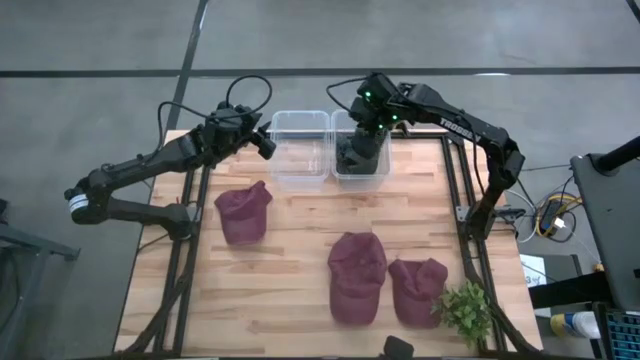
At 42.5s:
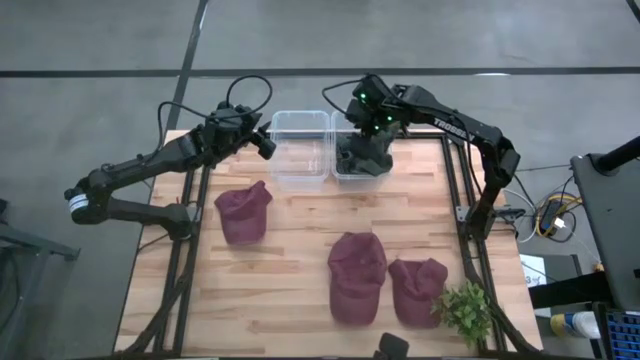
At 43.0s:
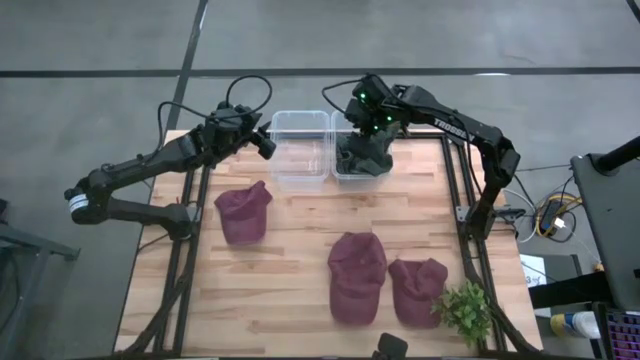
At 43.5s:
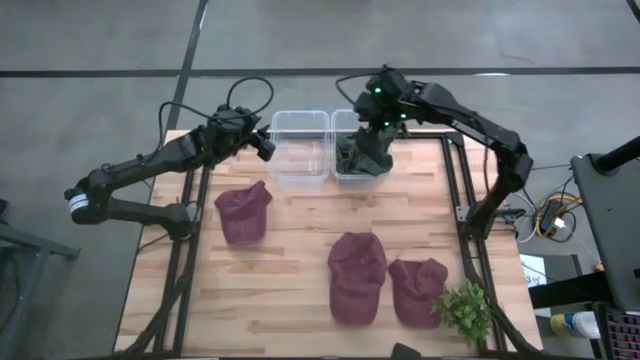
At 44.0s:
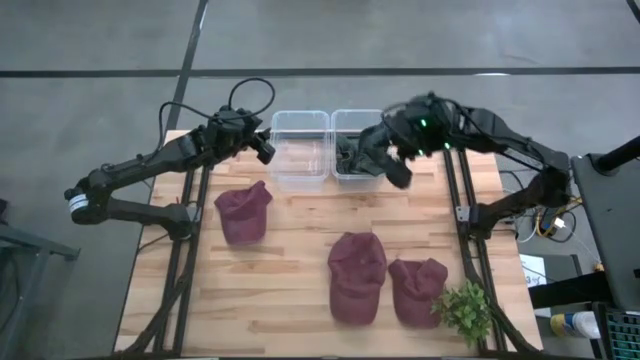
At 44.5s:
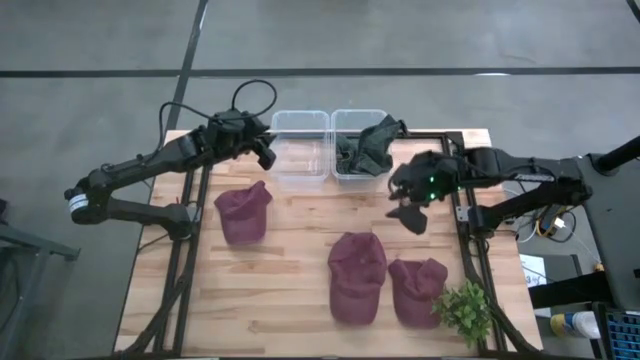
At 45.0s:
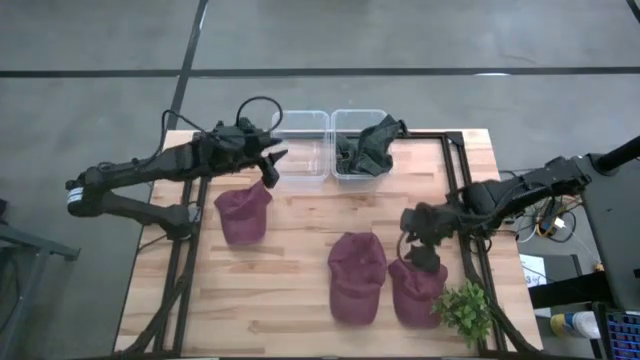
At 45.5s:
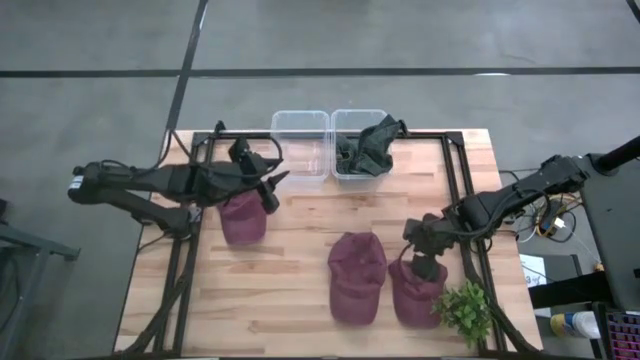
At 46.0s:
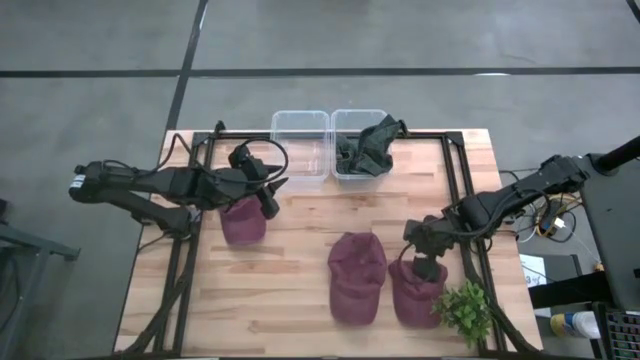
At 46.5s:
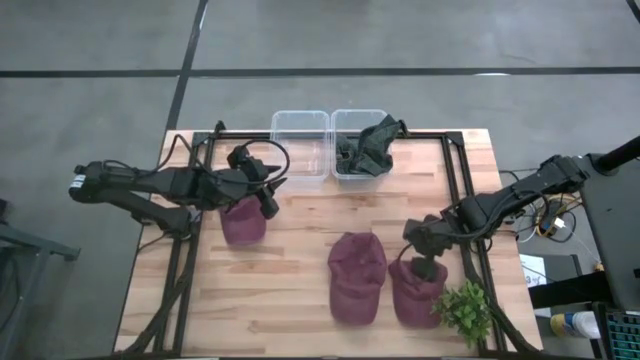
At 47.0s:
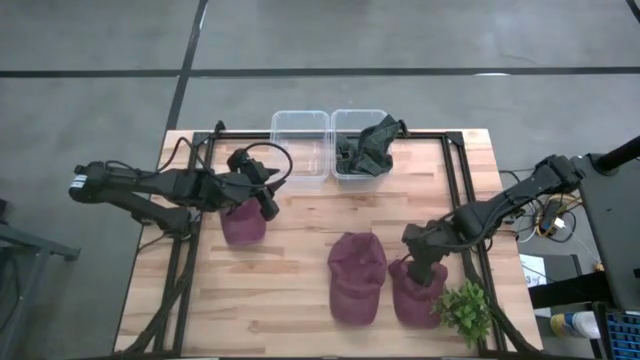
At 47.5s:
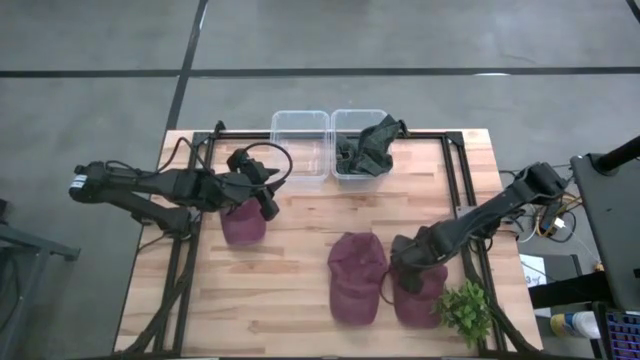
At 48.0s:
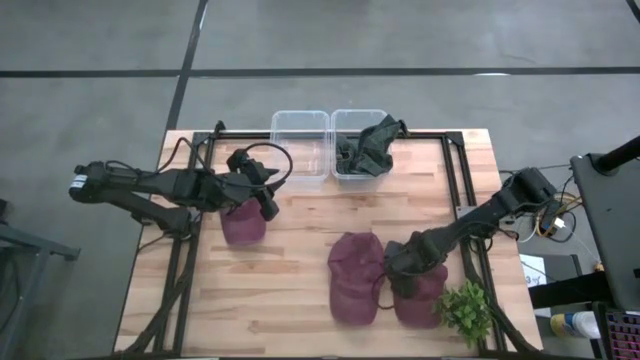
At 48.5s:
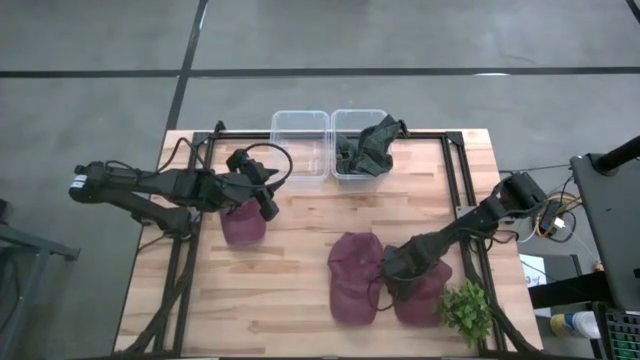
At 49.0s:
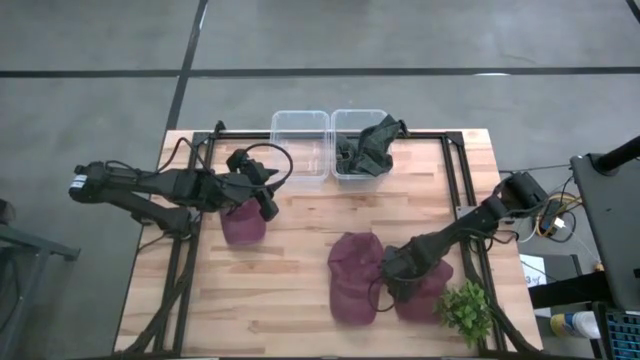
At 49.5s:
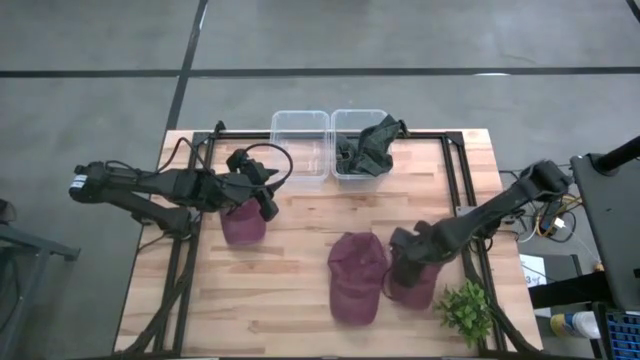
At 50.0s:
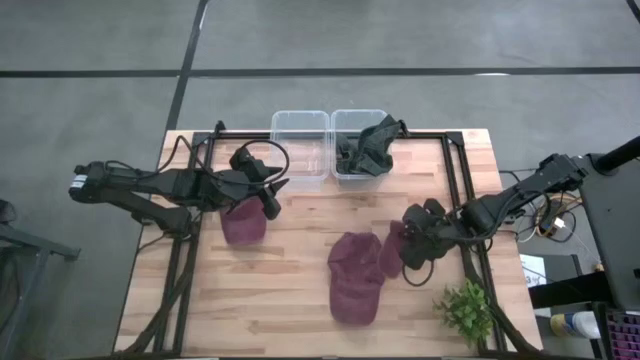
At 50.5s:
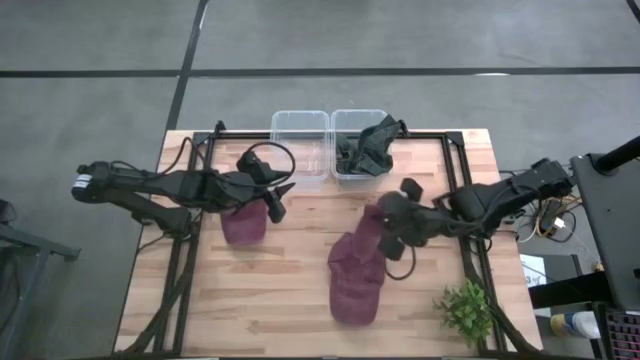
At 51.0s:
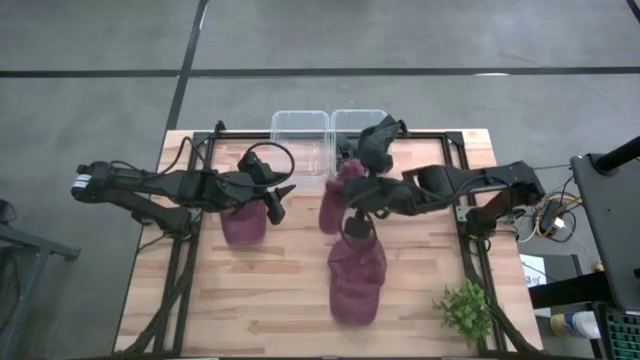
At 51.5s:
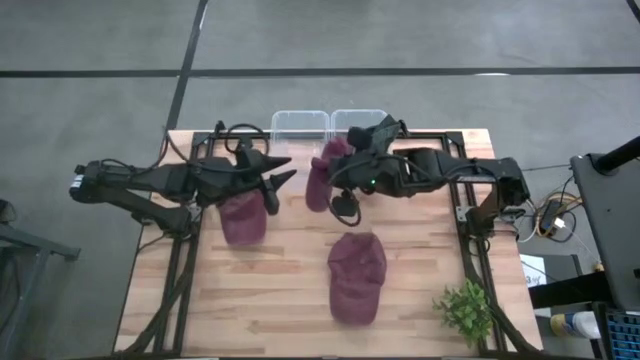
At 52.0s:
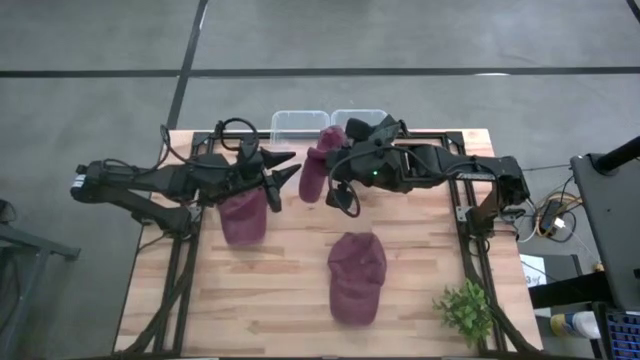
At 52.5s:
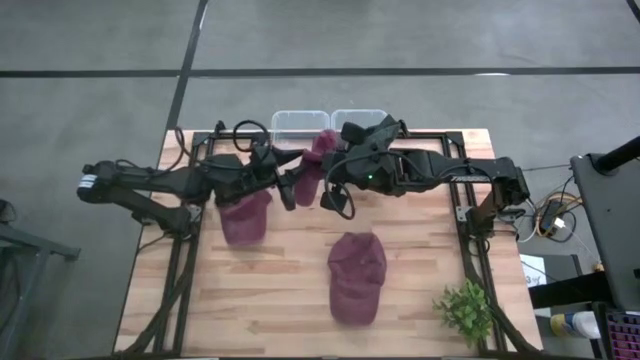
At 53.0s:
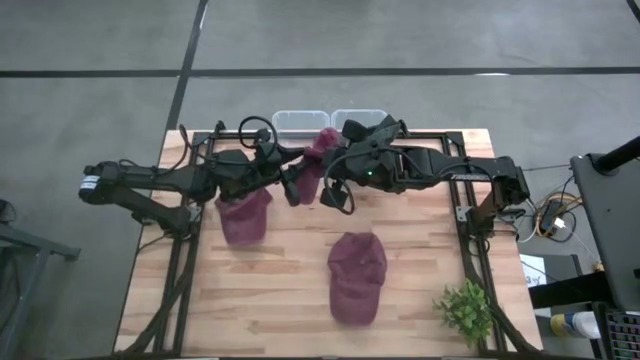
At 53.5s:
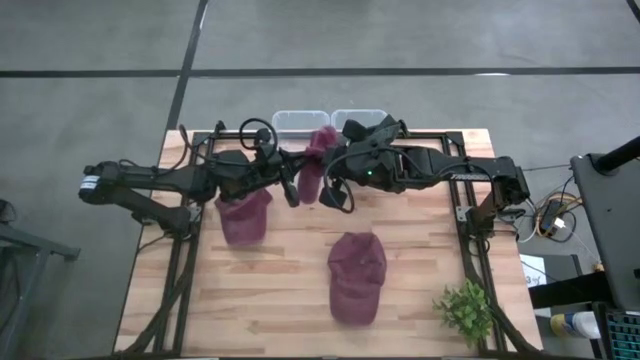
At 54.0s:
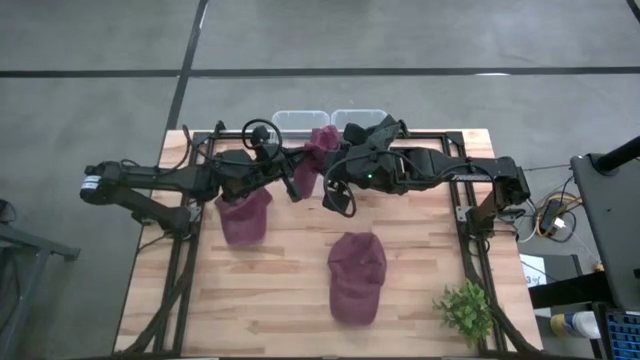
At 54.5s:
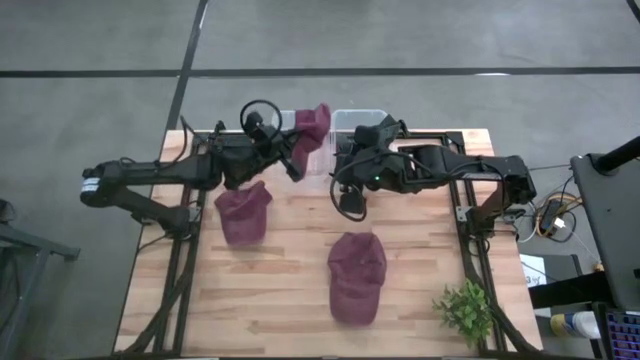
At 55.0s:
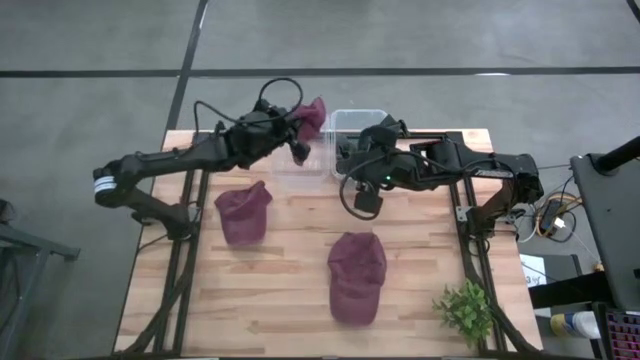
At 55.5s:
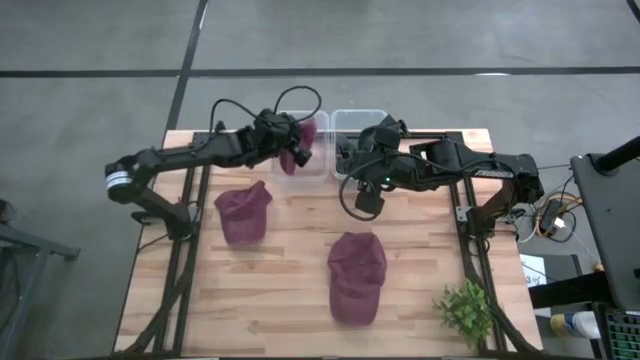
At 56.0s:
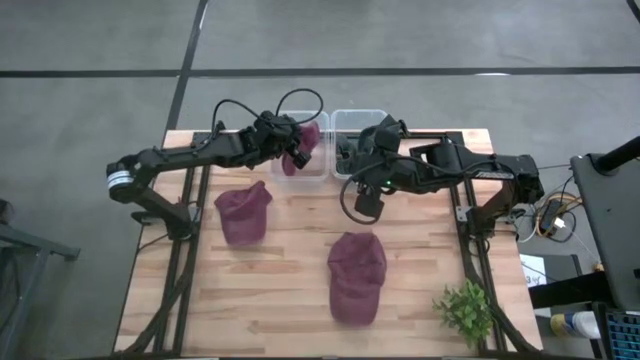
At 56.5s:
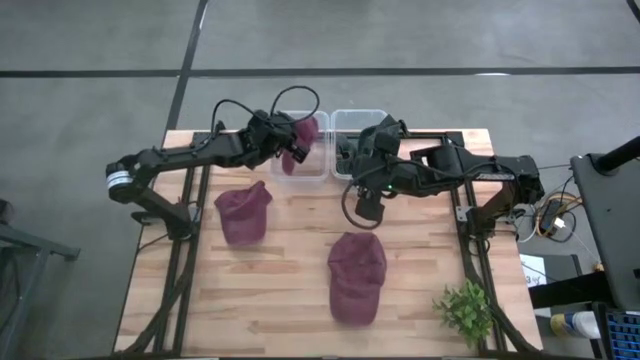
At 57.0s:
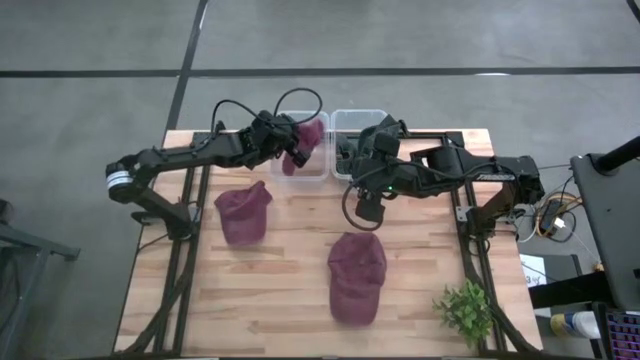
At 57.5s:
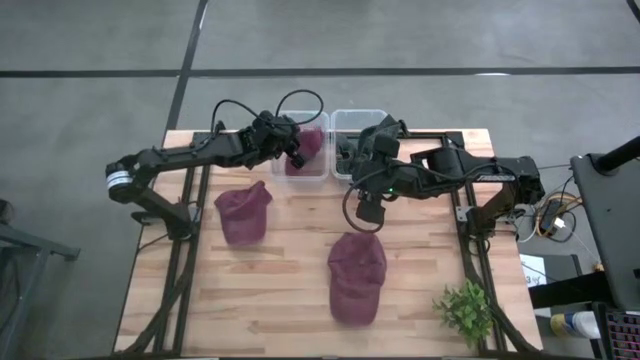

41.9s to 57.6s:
Task: Pick & Place hat
Put the right red cap into the left transparent bin

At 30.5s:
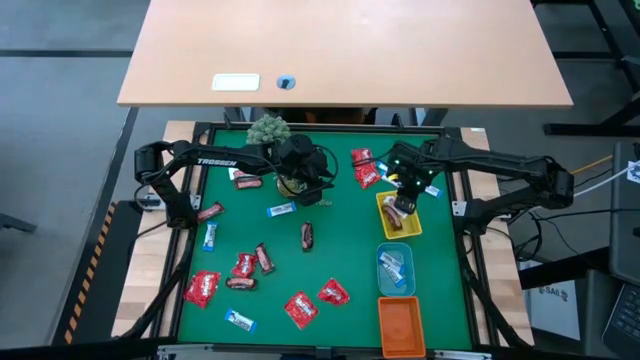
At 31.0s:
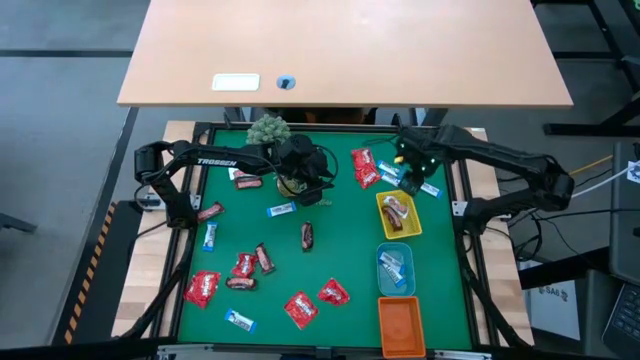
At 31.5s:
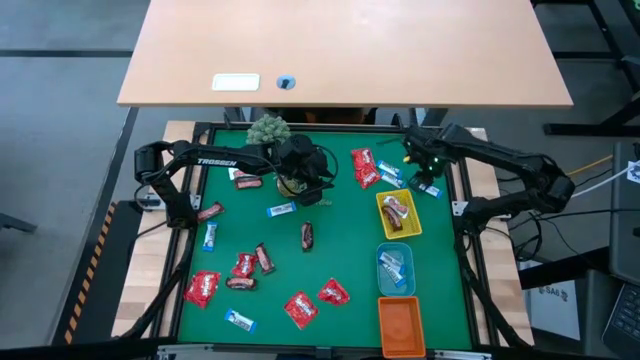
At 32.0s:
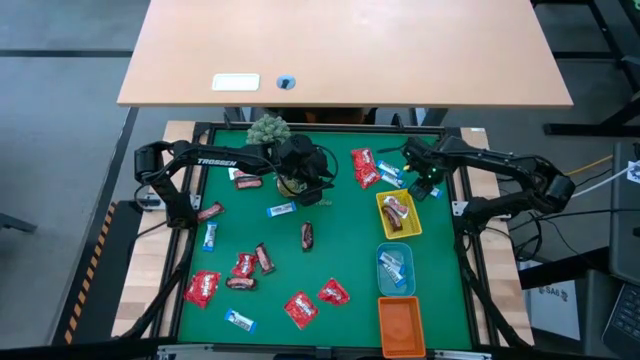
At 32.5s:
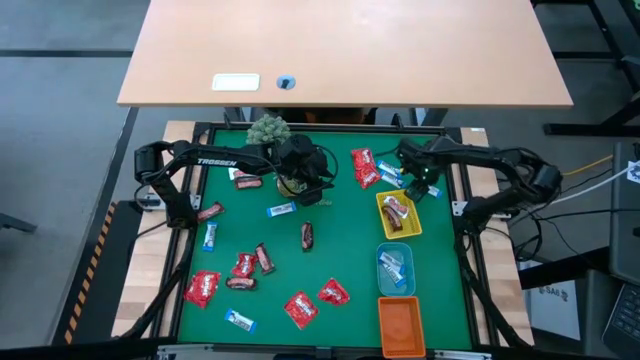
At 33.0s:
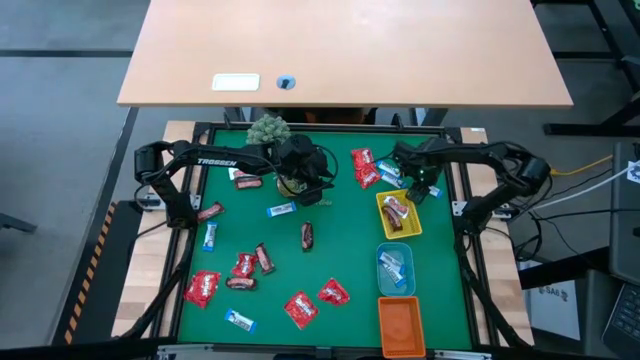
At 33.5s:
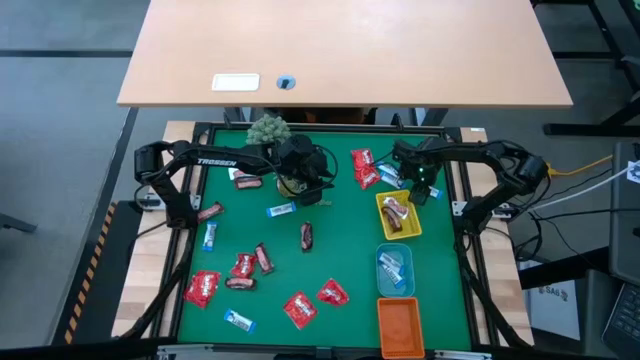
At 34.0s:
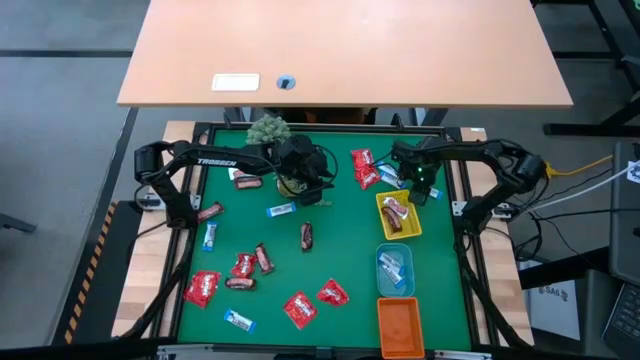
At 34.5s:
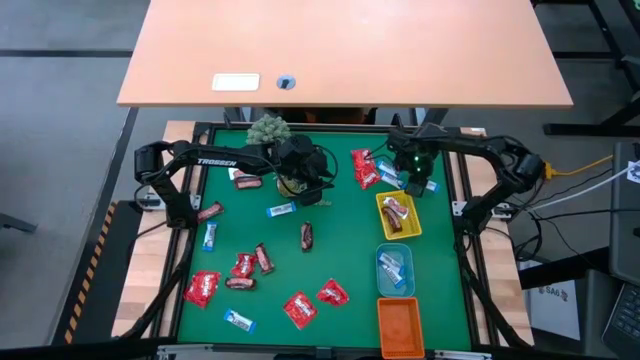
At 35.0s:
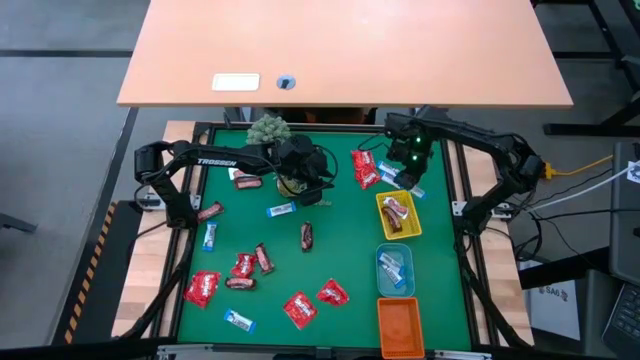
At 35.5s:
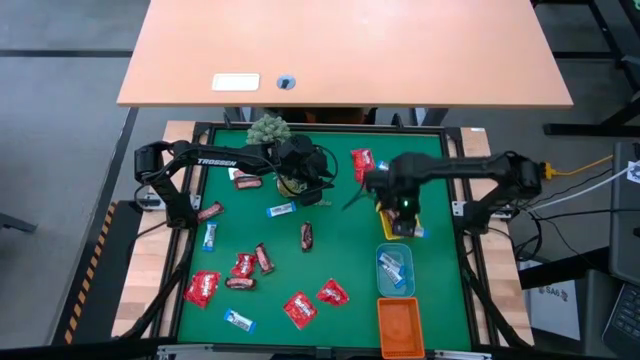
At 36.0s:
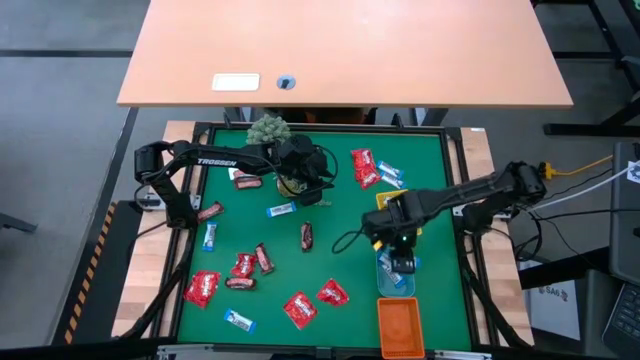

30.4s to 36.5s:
Task: Sort candy
Put the white chocolate into the blue bin
